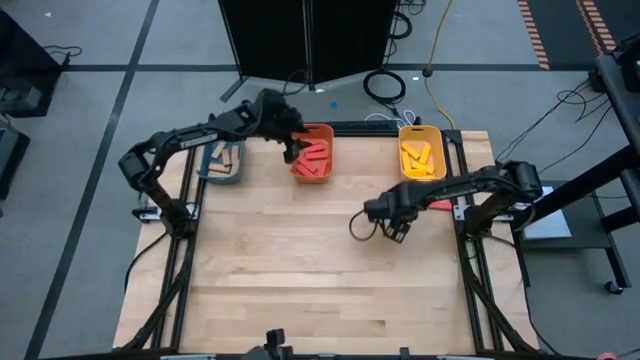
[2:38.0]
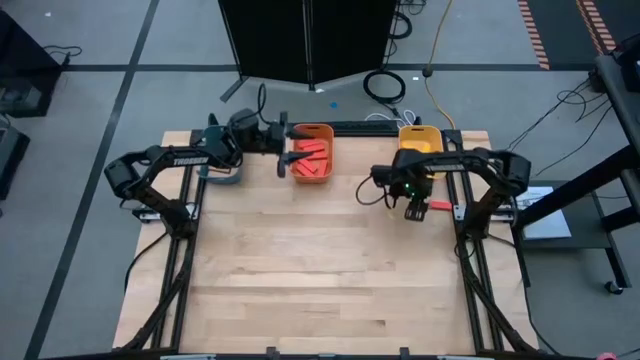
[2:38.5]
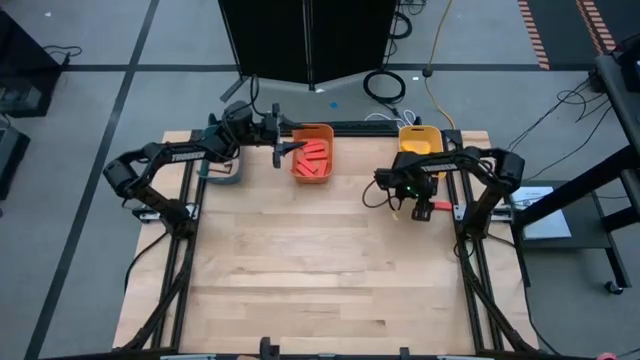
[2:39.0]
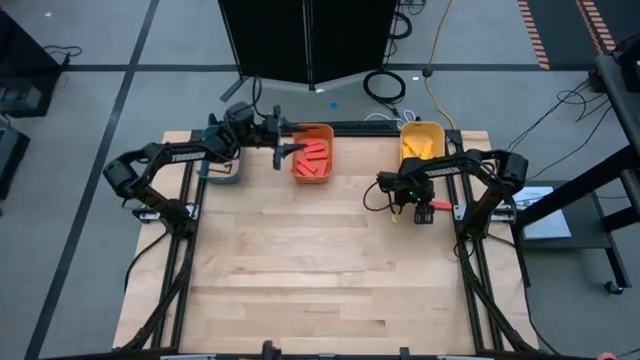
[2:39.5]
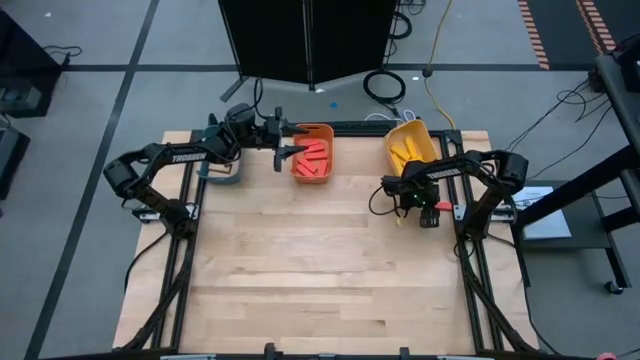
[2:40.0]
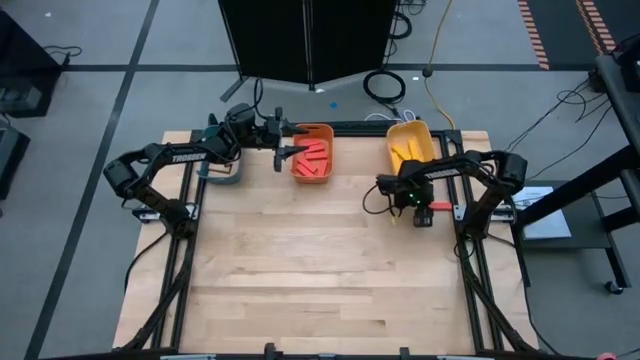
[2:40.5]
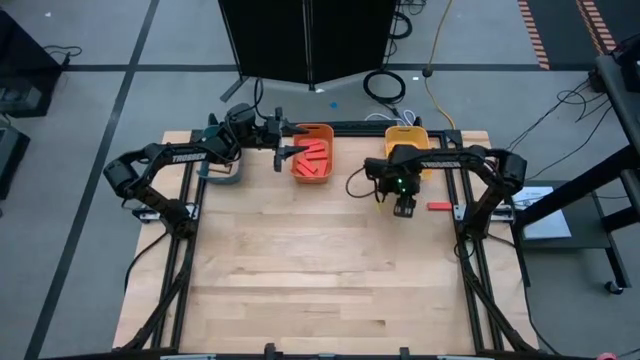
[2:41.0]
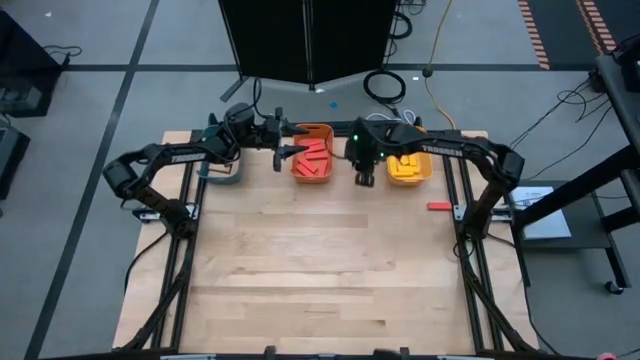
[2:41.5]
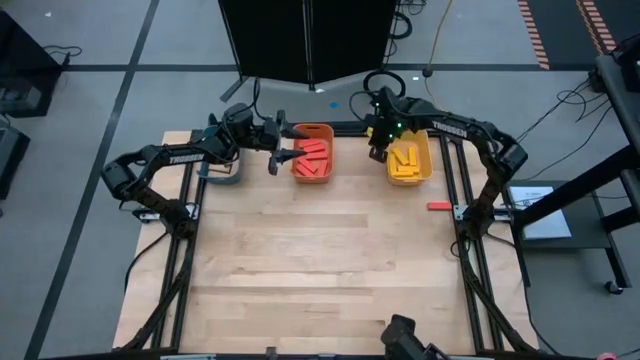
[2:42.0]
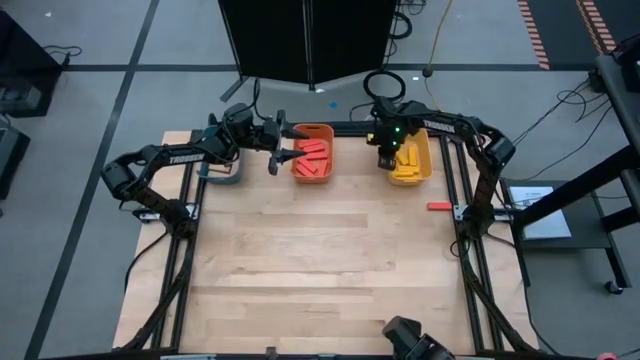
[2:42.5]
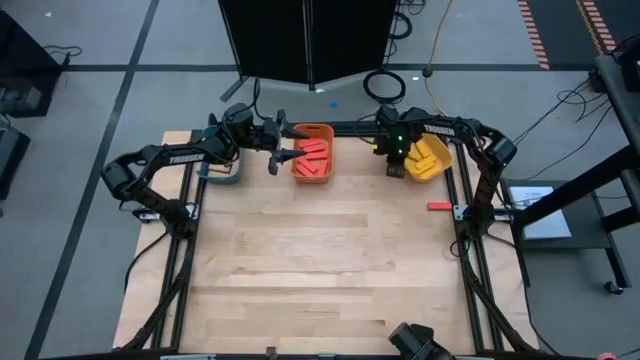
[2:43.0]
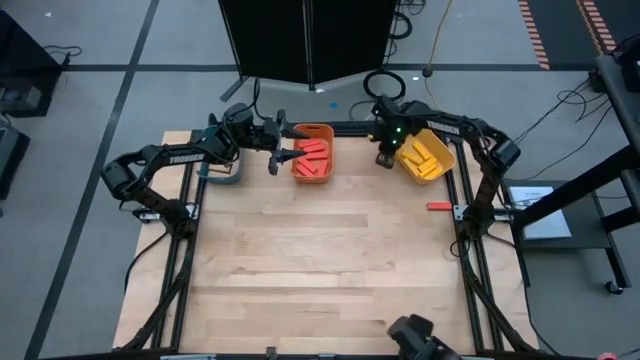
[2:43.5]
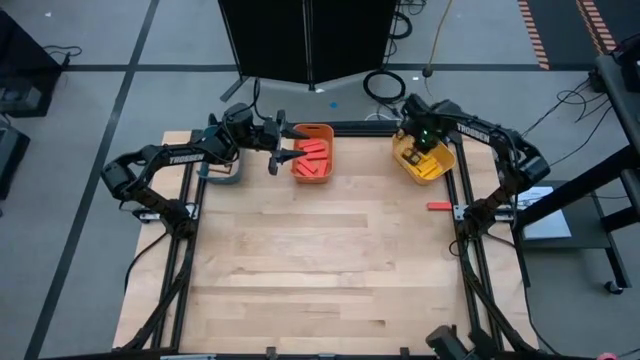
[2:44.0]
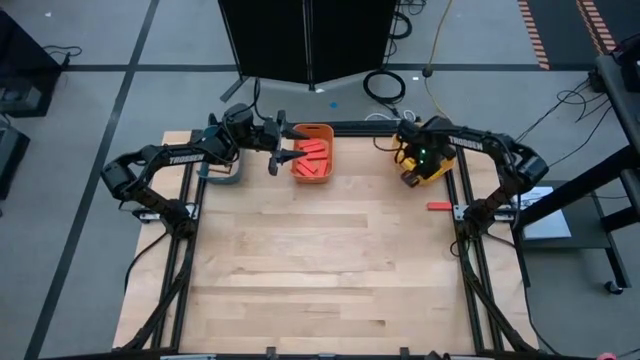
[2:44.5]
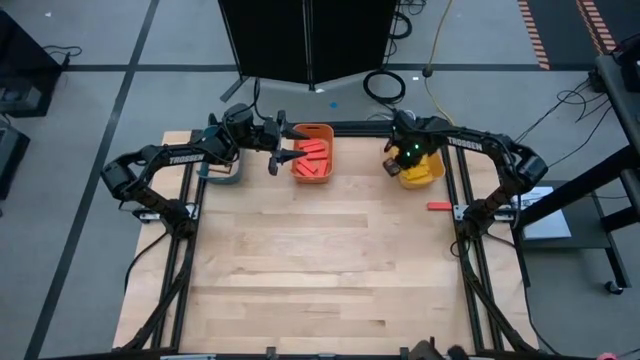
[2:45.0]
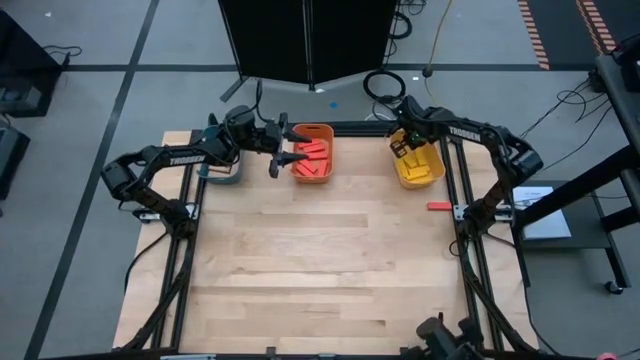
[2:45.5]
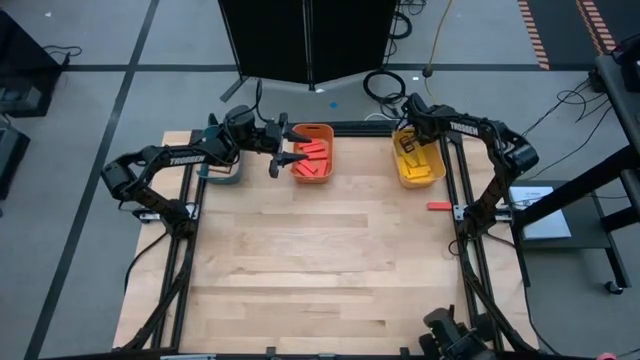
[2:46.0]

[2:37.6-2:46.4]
Task: Sort blocks
Adjust the yellow bin

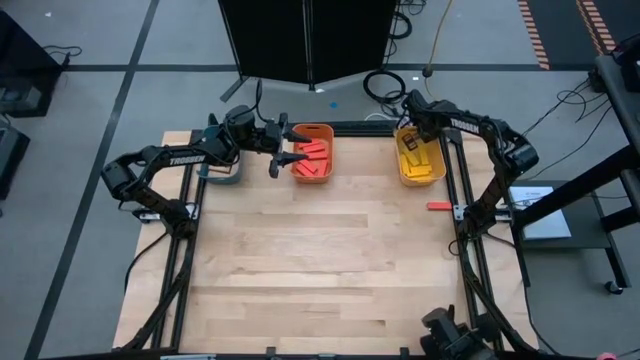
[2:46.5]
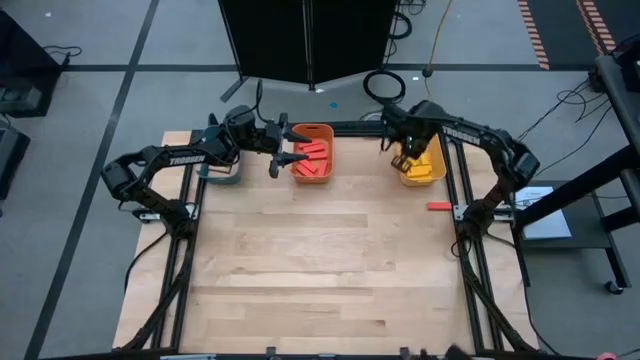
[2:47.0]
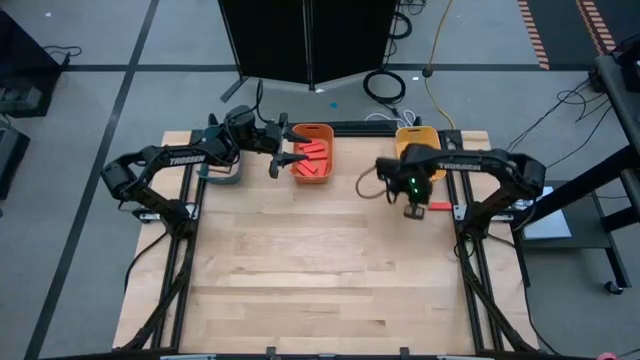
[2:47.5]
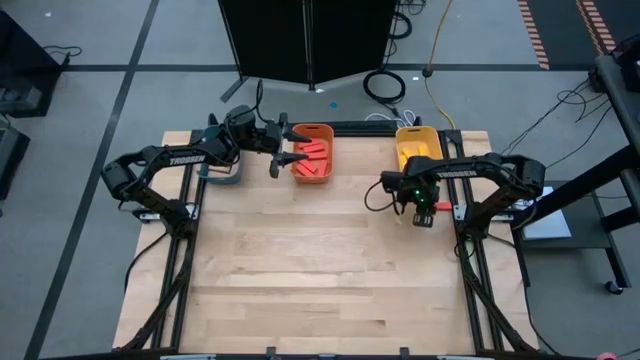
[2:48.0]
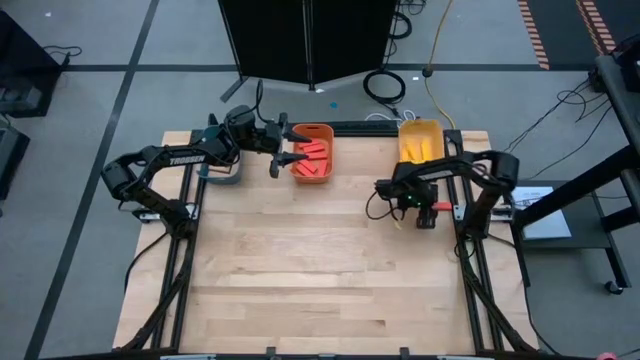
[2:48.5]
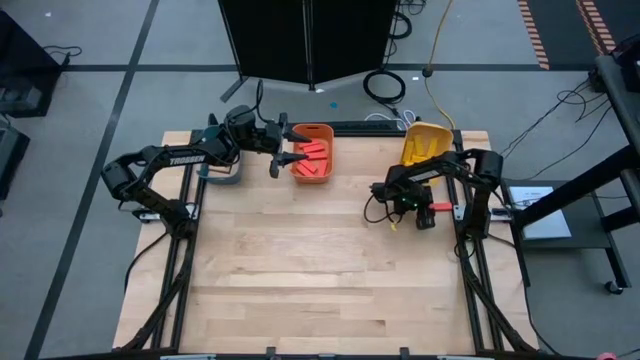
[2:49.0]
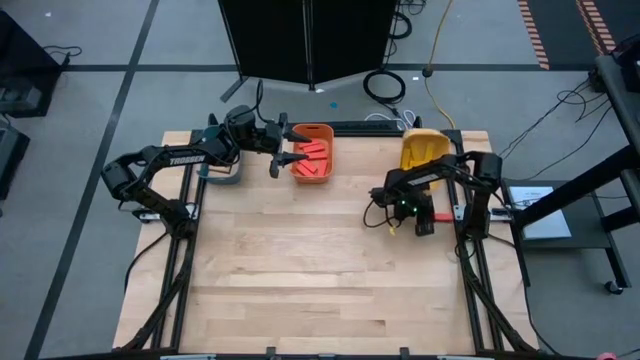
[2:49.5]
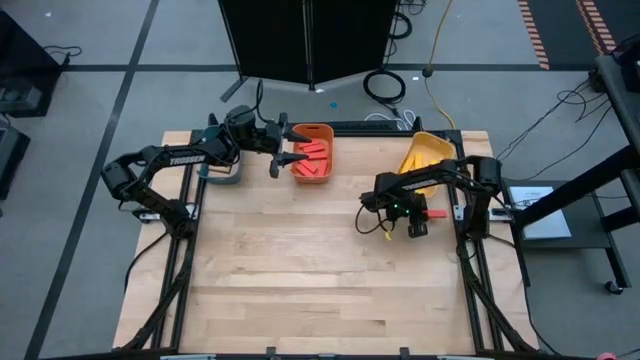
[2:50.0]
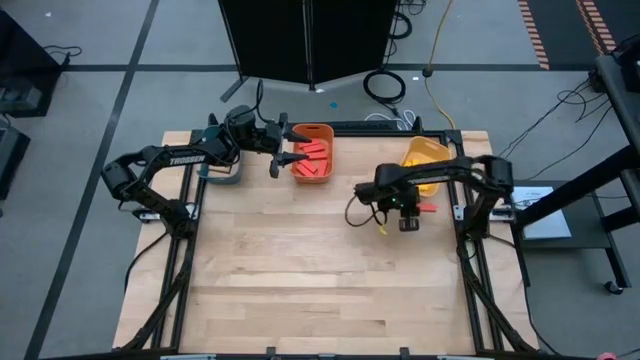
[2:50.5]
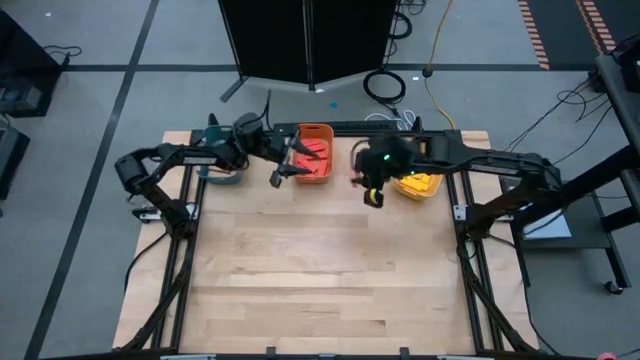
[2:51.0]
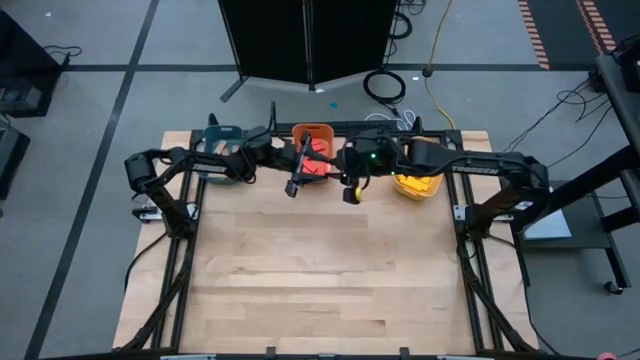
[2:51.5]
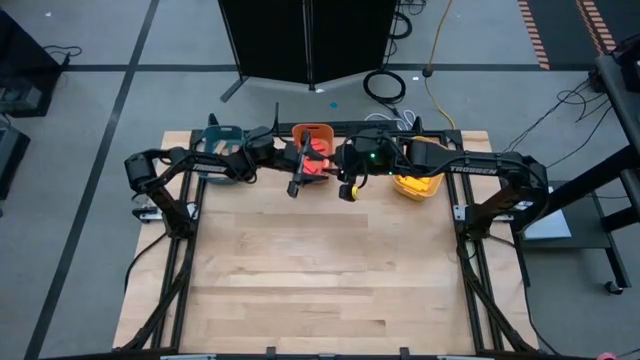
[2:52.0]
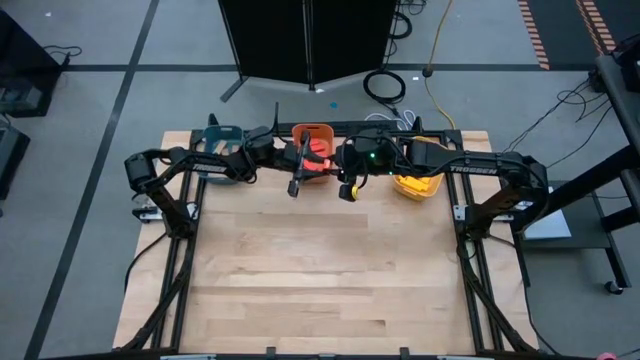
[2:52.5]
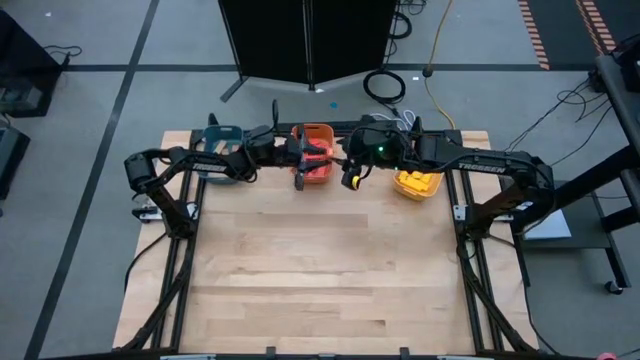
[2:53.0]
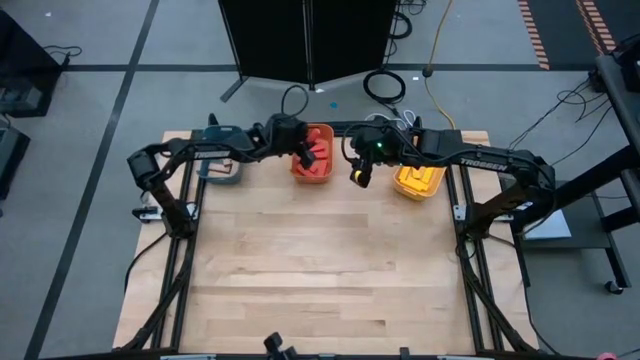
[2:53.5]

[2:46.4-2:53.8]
Put the red block into the orange bin

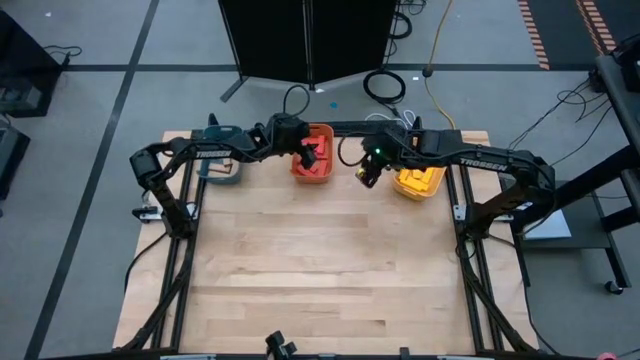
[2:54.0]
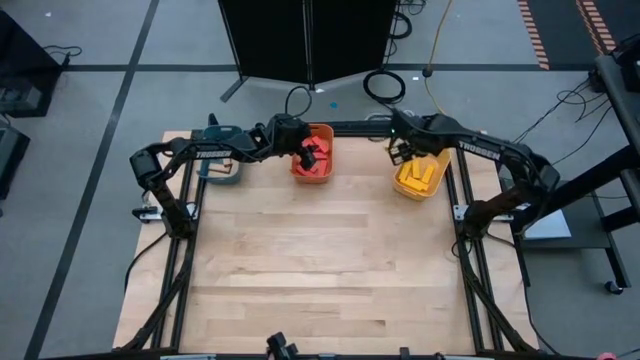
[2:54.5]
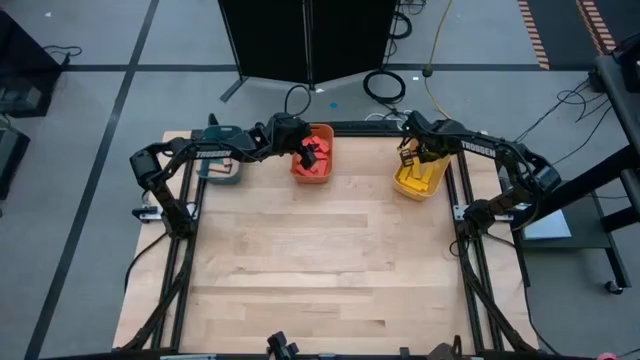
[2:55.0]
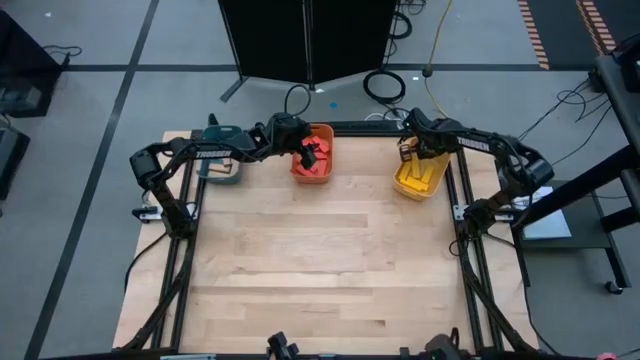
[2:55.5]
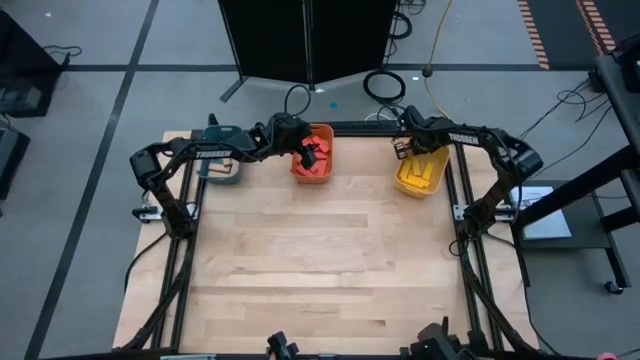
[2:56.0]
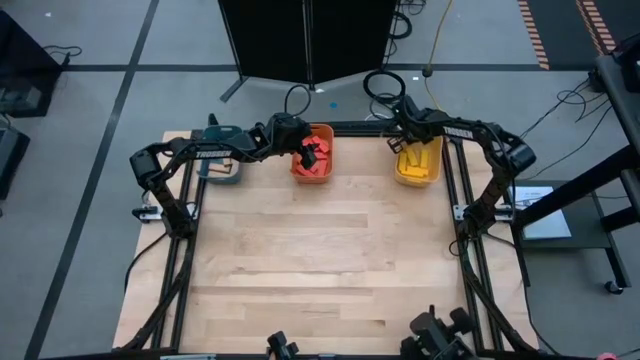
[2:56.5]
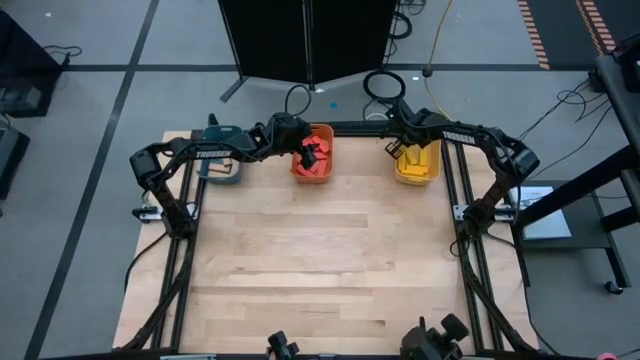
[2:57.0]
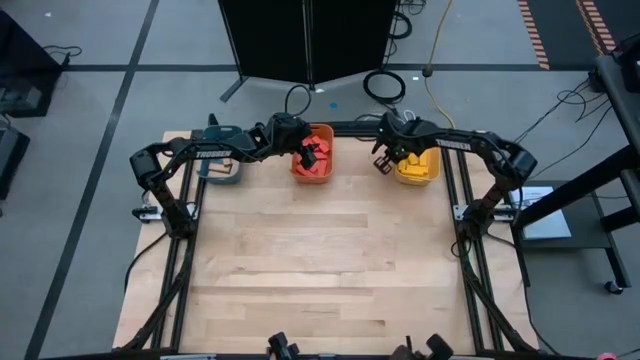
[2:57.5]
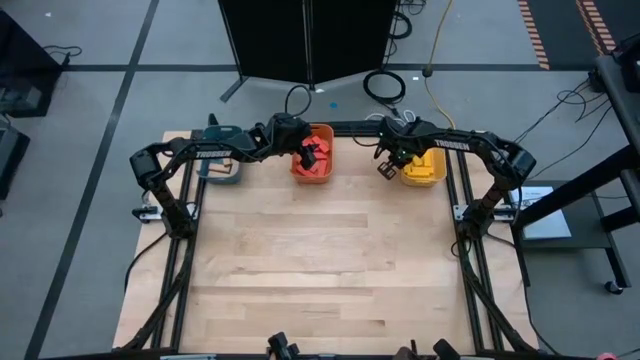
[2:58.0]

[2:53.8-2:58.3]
Adjust the yellow bin

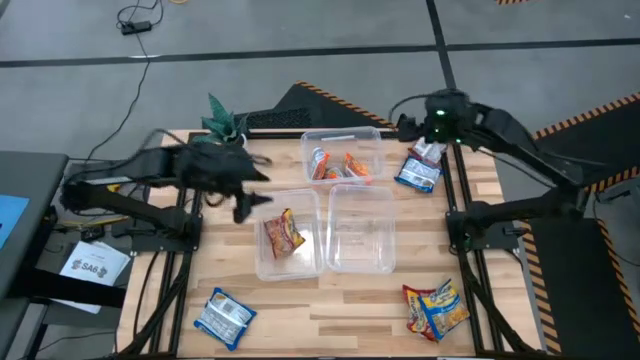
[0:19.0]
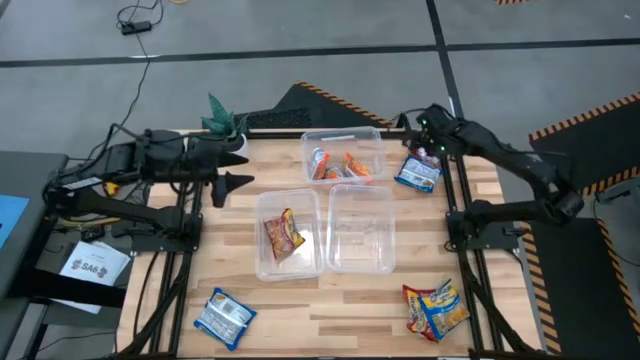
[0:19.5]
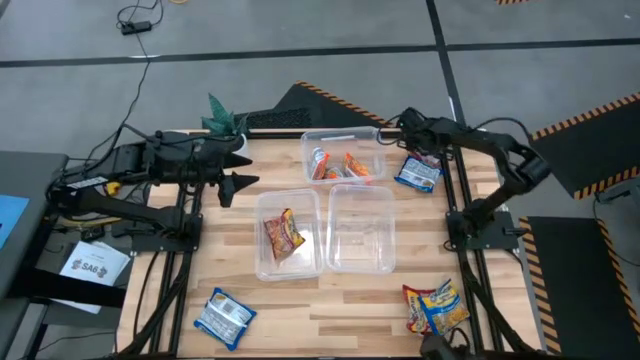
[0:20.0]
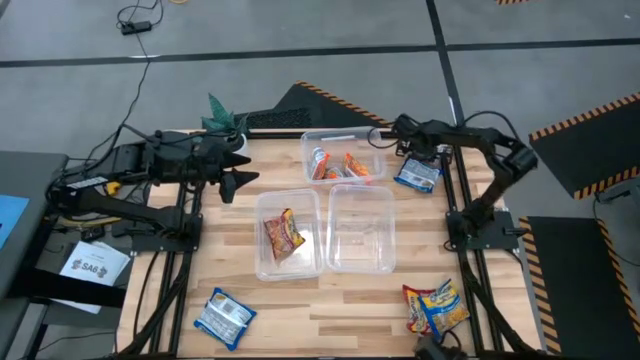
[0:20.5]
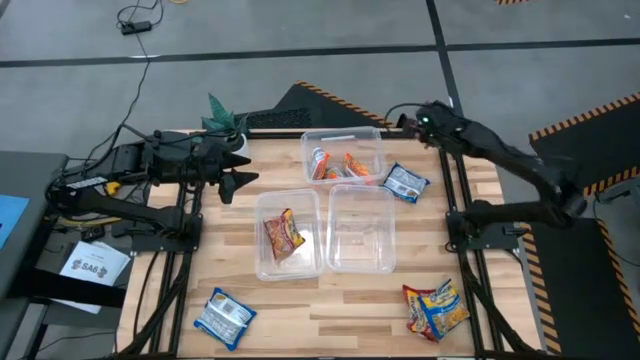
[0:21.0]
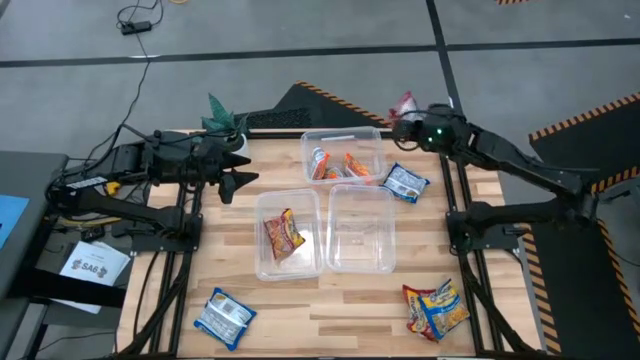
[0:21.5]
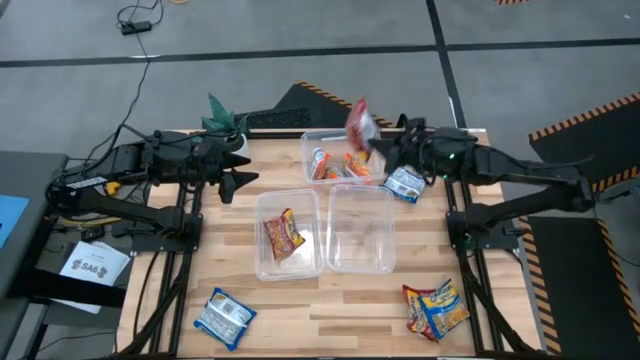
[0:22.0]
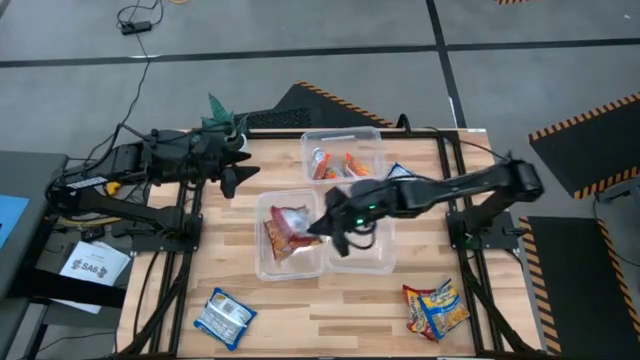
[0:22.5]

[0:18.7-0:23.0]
Task: Sort Maruchan noodles
Put the top red noodle pack into the bottom left transparent bin
